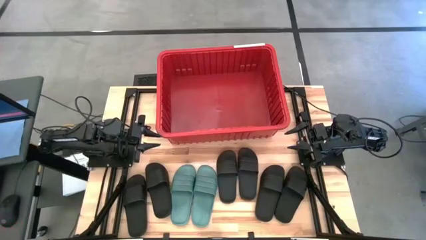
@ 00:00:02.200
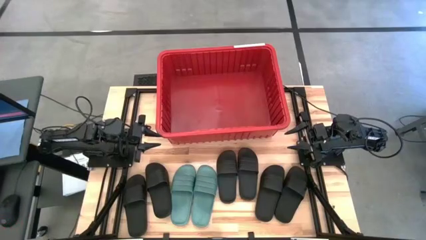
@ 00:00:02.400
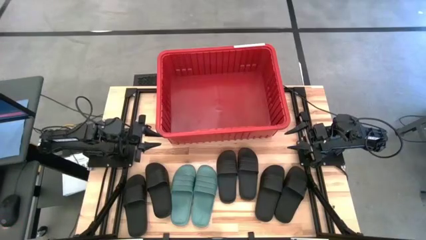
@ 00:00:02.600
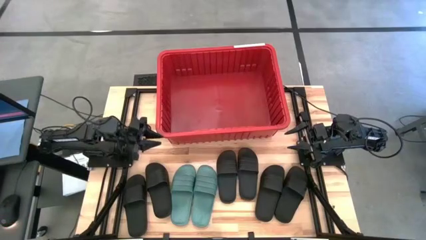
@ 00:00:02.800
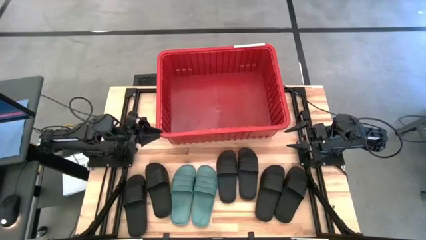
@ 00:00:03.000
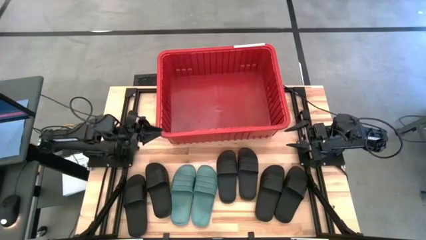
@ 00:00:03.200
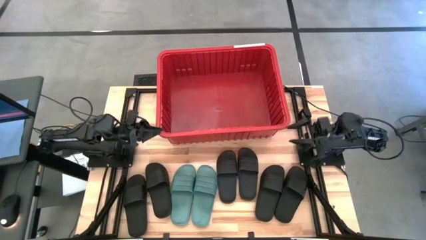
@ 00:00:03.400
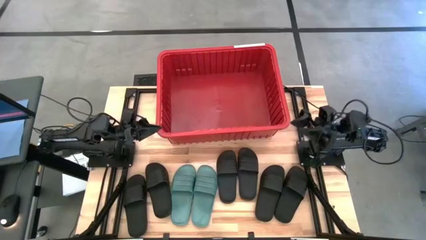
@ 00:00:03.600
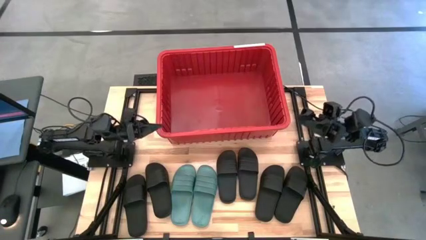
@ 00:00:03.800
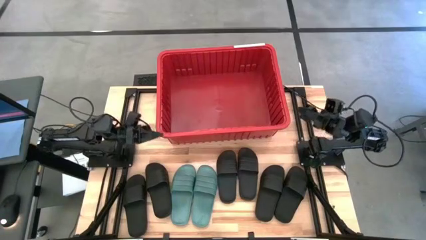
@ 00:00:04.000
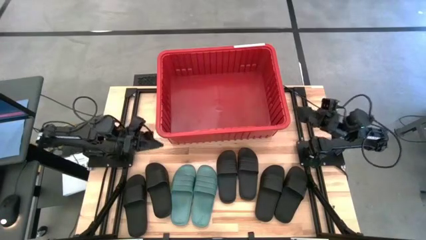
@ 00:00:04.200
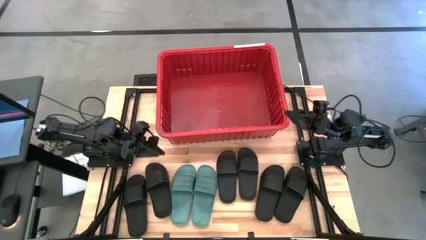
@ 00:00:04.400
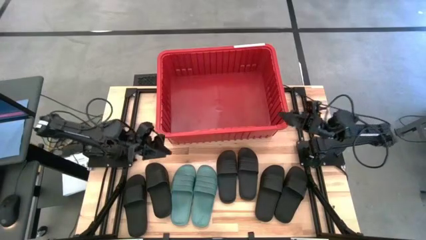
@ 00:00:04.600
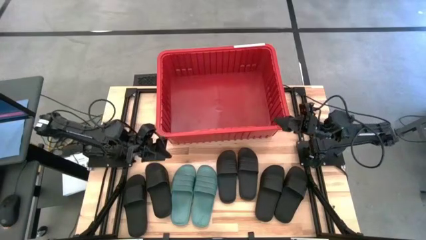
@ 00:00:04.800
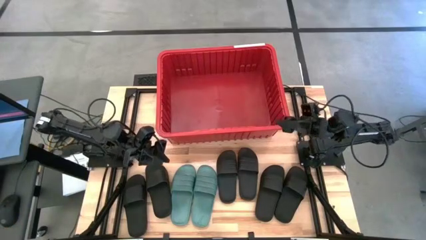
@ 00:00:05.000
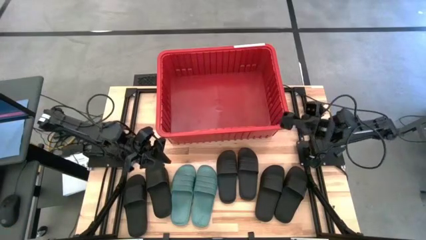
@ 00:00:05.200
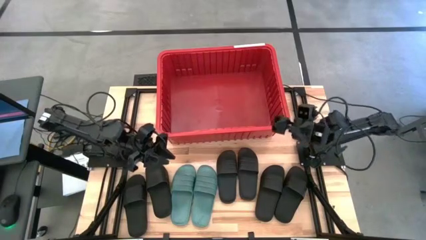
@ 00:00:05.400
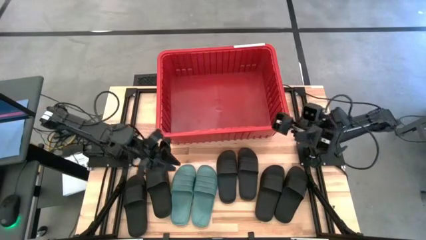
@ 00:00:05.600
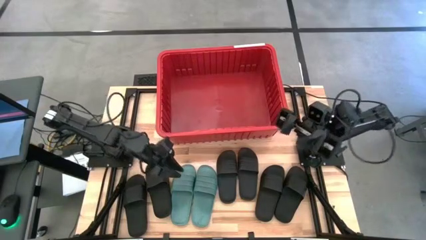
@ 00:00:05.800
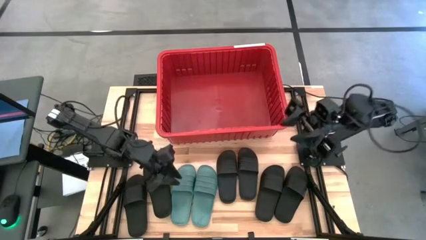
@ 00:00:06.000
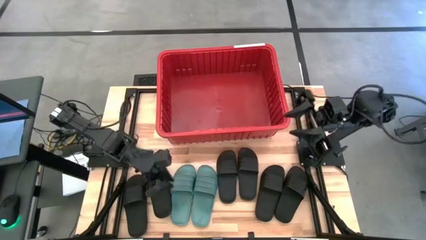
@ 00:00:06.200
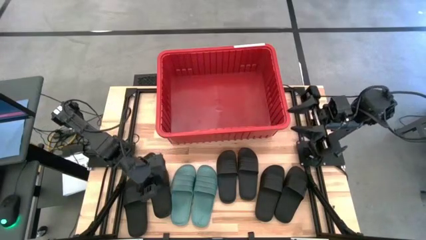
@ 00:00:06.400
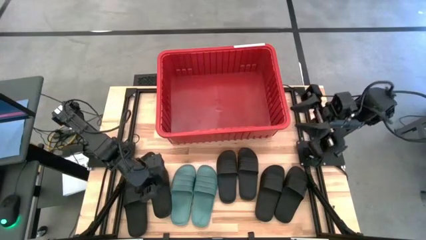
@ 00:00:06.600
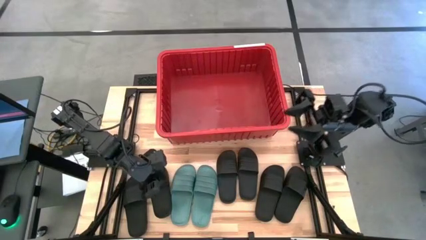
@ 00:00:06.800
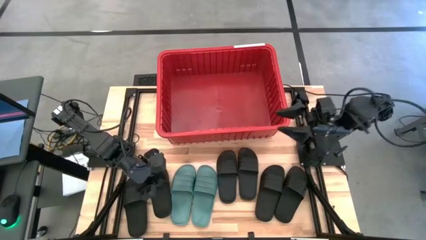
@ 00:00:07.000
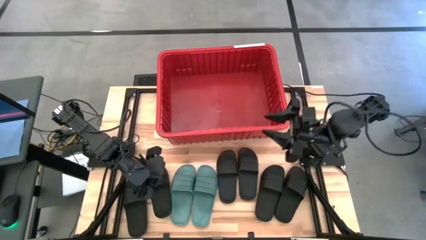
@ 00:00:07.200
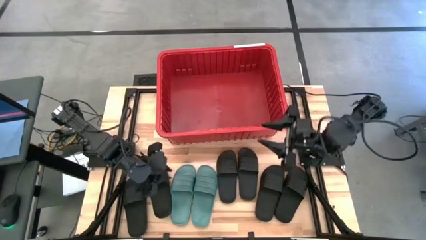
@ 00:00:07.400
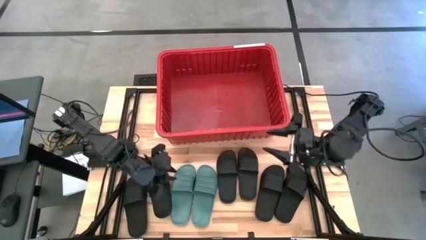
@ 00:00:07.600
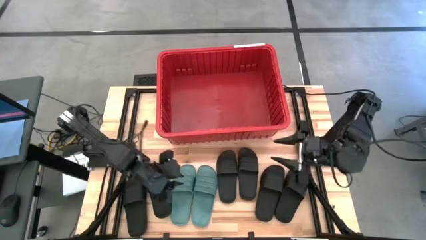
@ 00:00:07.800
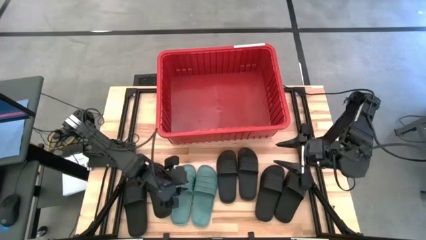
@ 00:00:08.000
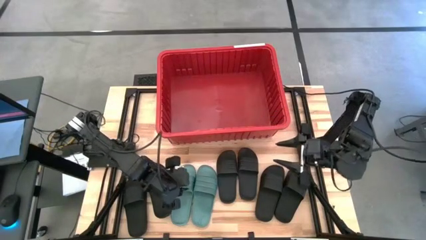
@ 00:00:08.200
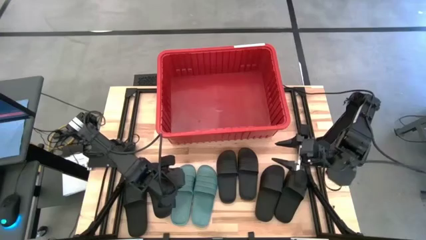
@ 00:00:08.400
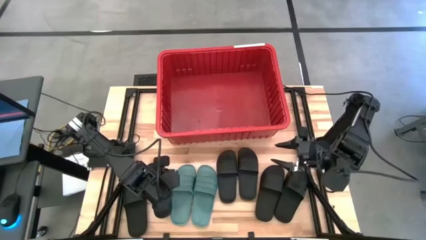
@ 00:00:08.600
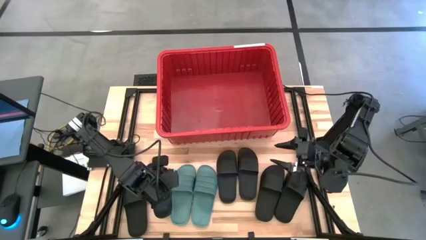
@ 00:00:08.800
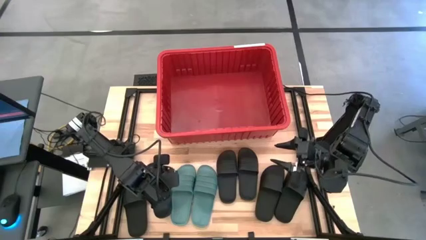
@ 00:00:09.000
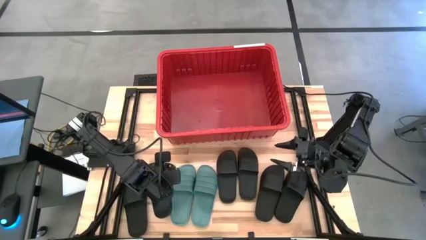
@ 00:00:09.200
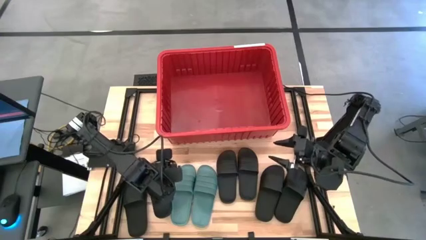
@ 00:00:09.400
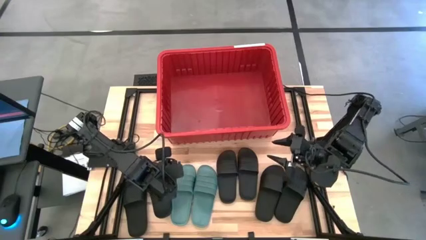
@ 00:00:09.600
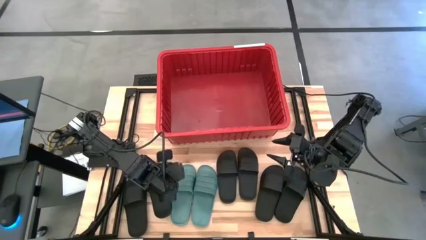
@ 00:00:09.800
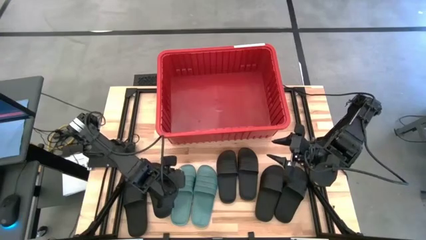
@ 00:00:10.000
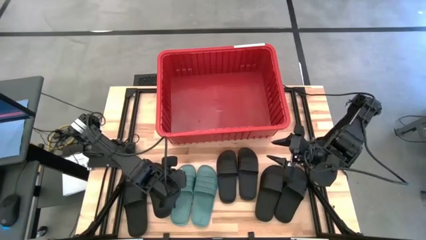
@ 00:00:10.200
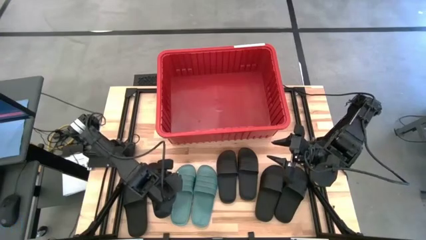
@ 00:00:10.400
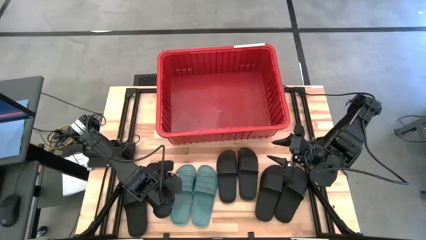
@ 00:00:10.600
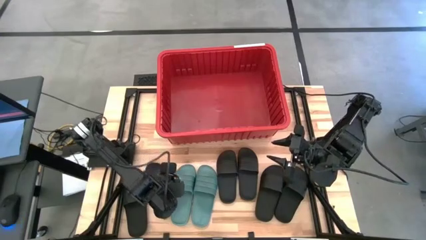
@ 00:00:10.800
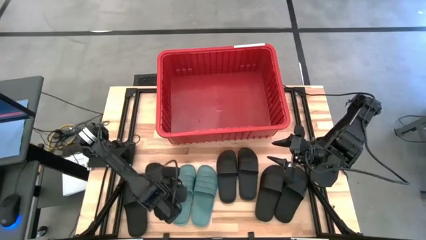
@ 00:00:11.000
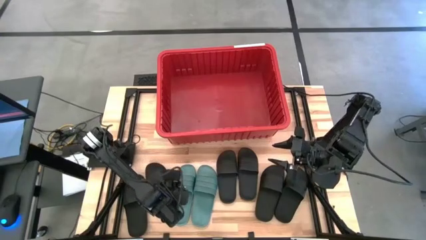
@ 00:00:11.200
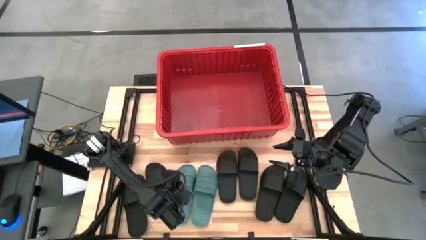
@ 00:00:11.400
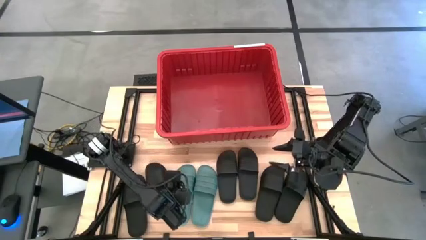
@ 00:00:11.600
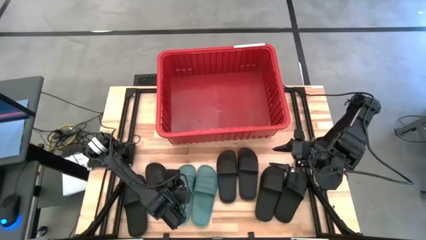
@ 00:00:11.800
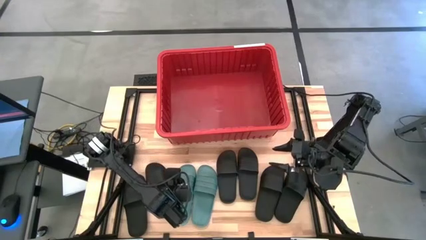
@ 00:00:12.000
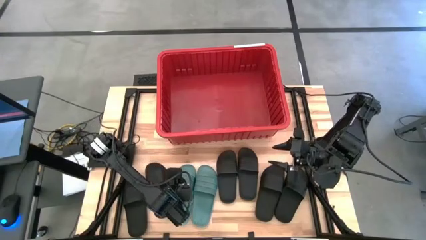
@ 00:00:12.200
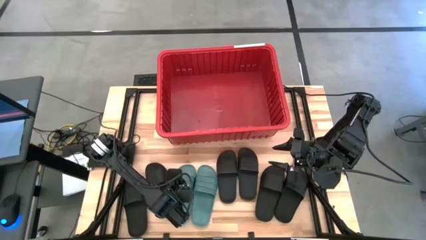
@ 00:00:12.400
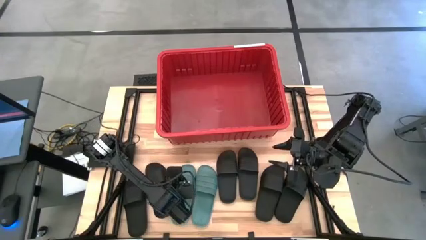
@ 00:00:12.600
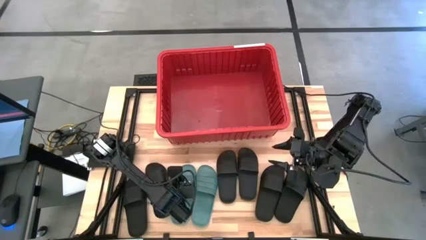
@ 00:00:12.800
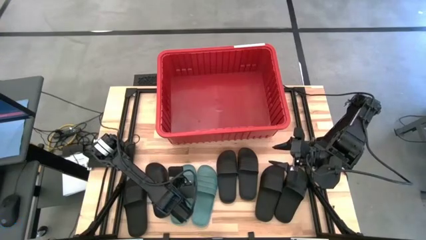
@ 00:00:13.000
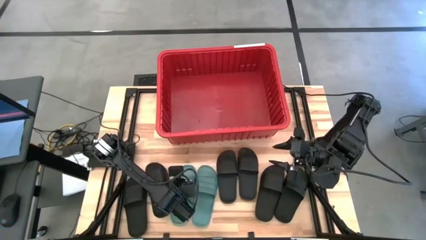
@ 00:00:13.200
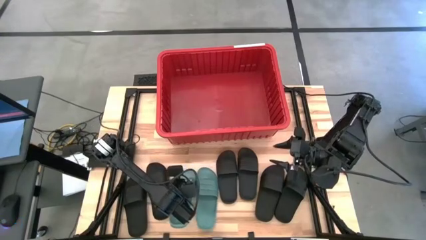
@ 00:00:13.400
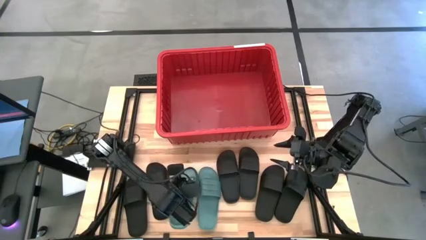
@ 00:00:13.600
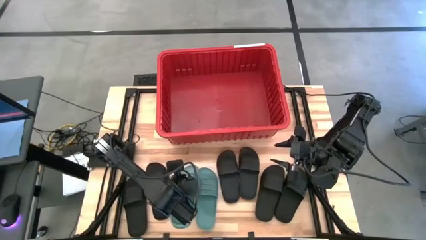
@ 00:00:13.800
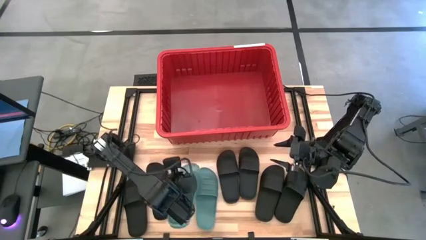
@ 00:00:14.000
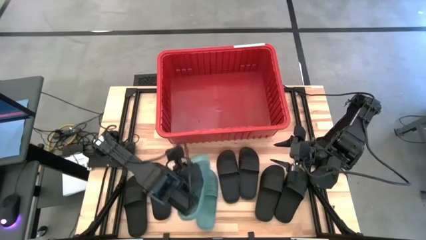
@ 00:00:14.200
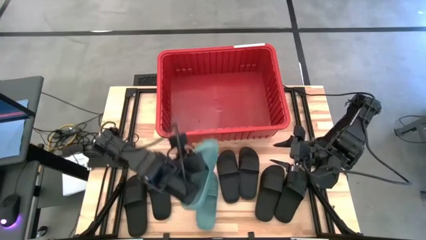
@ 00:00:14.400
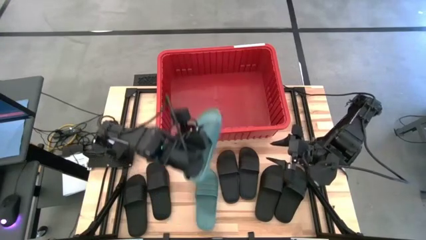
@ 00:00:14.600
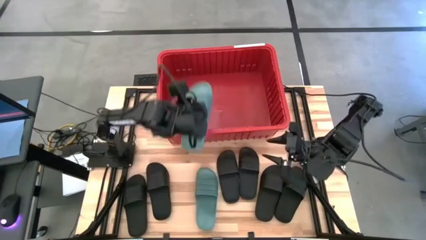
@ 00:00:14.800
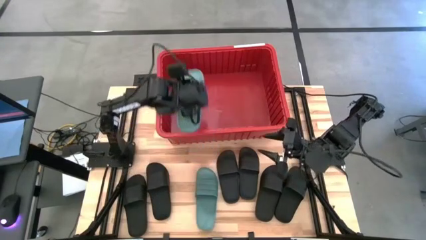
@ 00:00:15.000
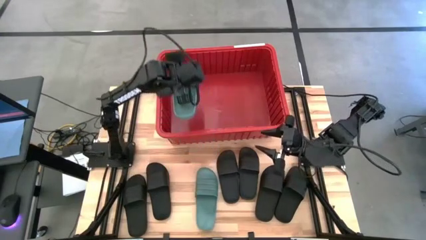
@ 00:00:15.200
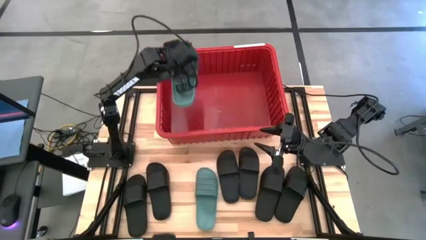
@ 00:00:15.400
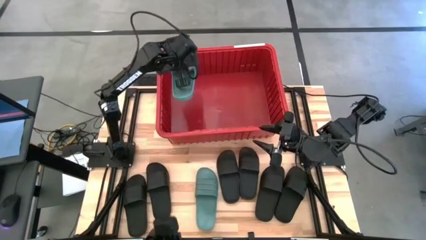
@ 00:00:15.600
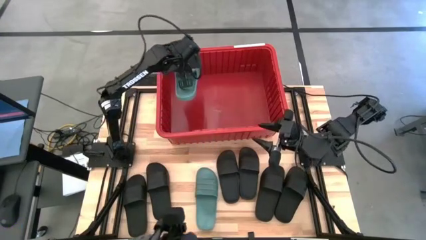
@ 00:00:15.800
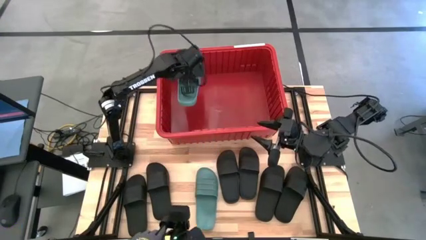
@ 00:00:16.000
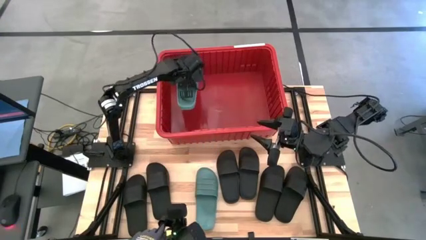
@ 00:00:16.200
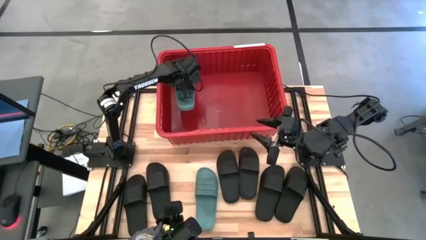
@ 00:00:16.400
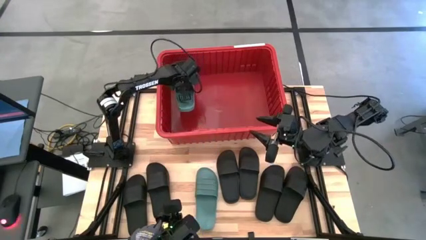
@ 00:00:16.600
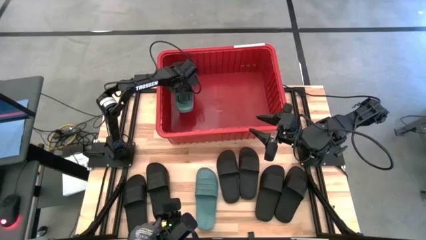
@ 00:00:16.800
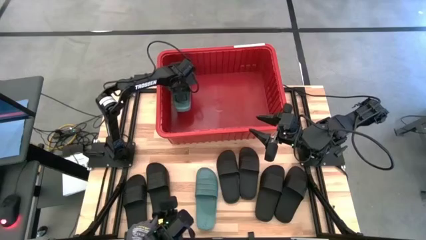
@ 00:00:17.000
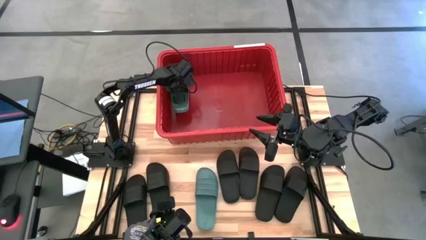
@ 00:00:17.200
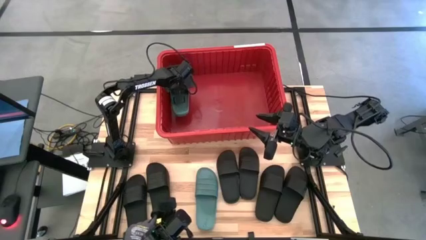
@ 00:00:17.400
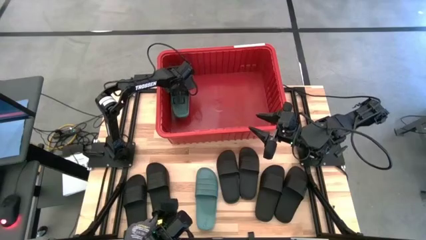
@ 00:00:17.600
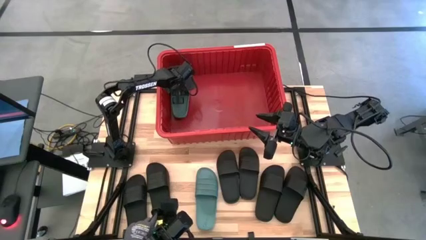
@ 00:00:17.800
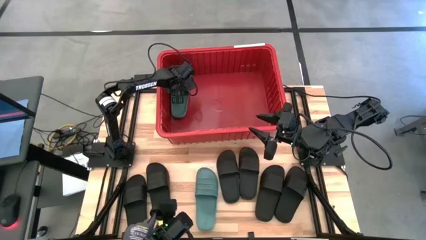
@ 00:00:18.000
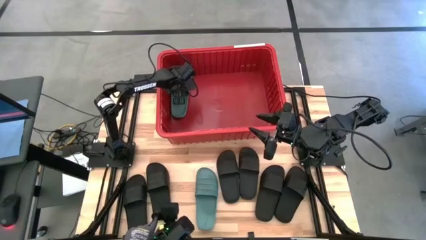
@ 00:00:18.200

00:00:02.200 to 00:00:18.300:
Task: Pick and place slides into bin
Put the green slipper into the red container container
